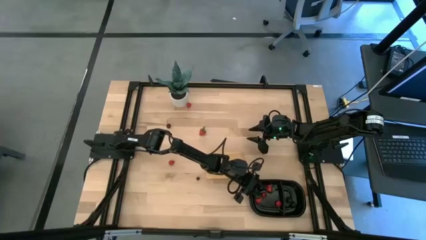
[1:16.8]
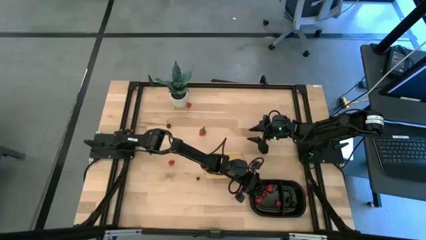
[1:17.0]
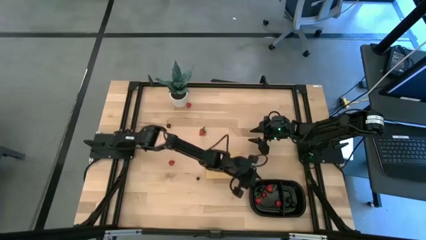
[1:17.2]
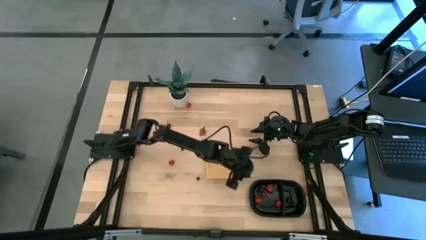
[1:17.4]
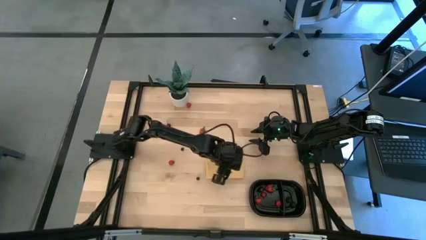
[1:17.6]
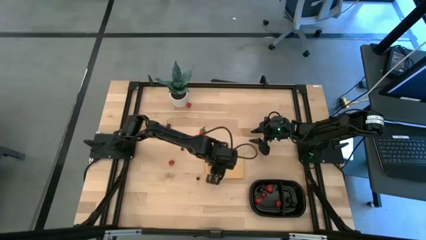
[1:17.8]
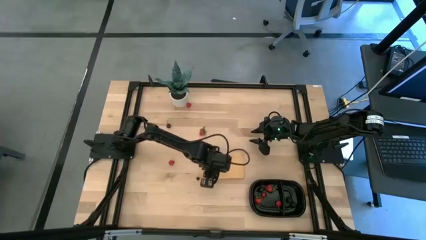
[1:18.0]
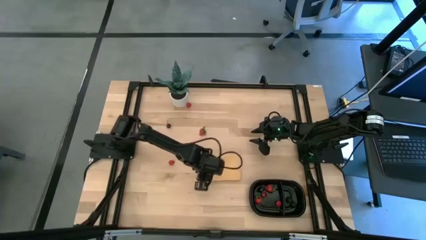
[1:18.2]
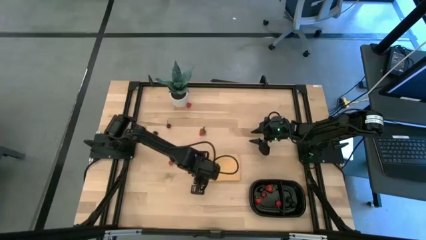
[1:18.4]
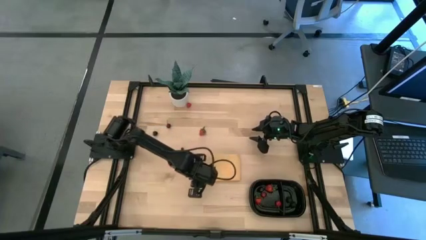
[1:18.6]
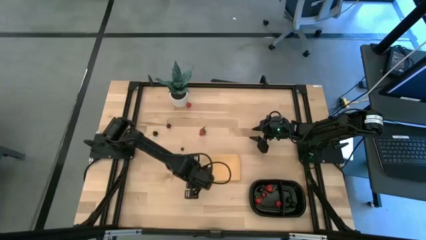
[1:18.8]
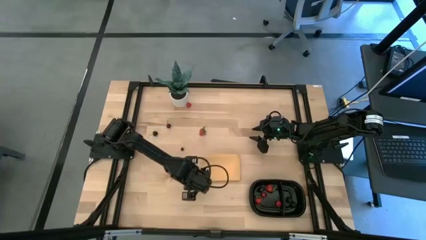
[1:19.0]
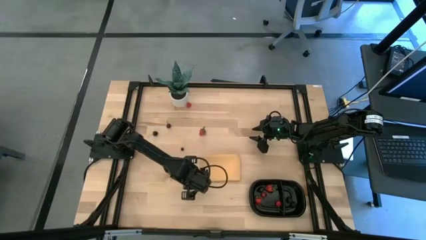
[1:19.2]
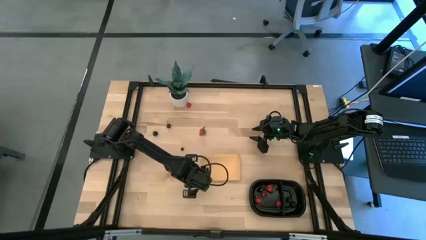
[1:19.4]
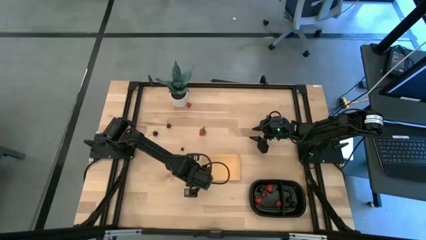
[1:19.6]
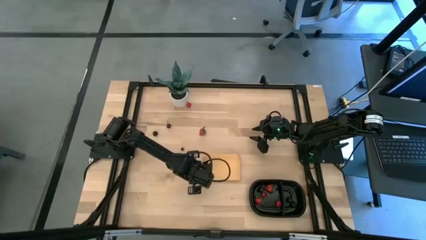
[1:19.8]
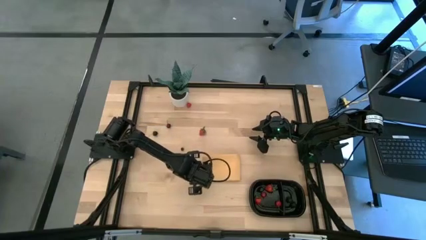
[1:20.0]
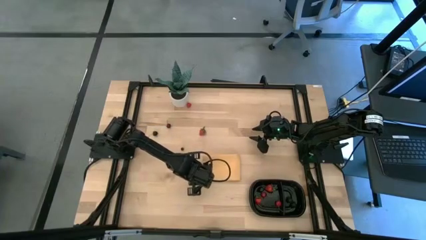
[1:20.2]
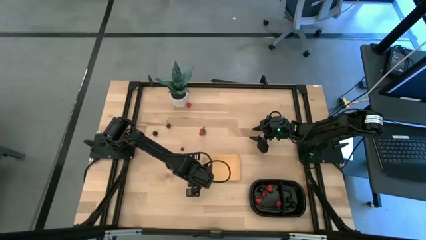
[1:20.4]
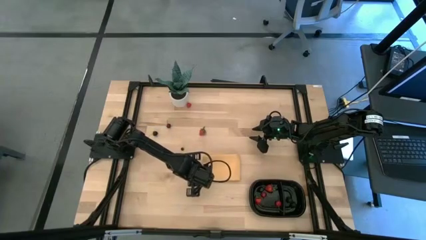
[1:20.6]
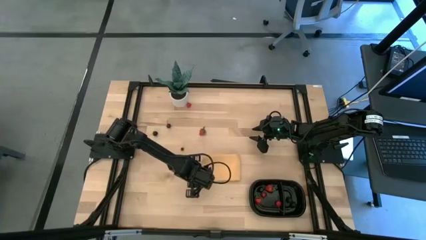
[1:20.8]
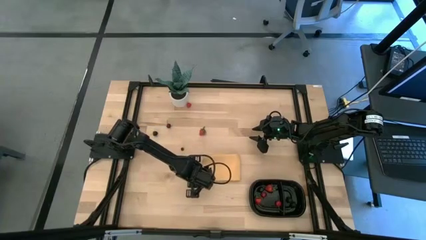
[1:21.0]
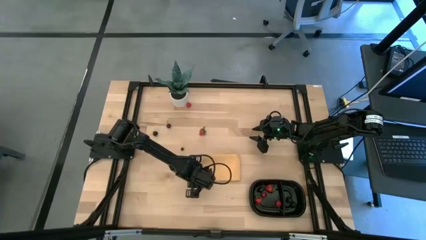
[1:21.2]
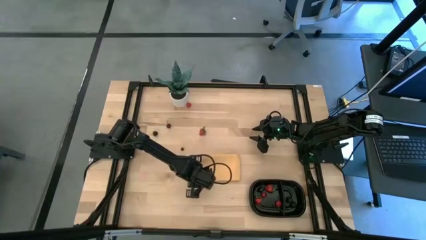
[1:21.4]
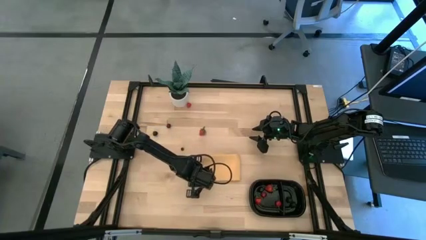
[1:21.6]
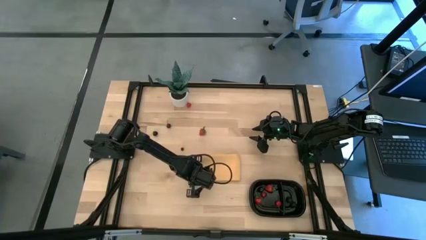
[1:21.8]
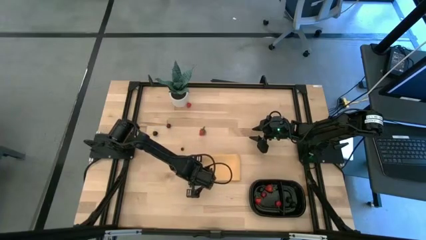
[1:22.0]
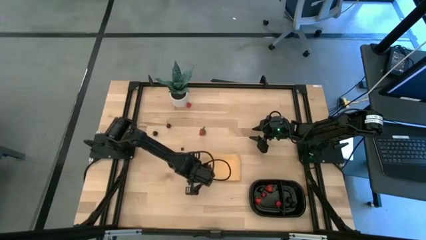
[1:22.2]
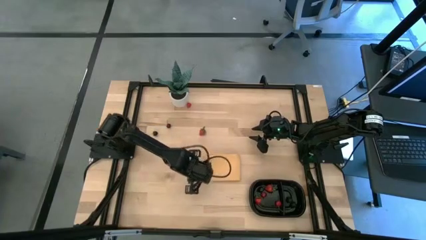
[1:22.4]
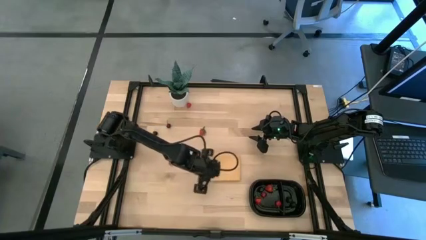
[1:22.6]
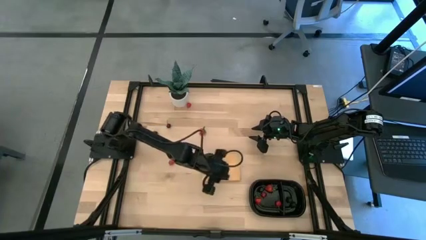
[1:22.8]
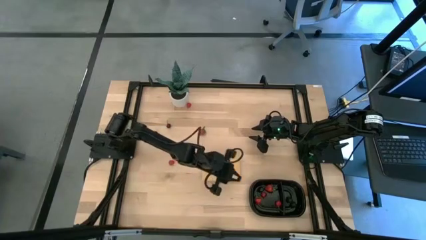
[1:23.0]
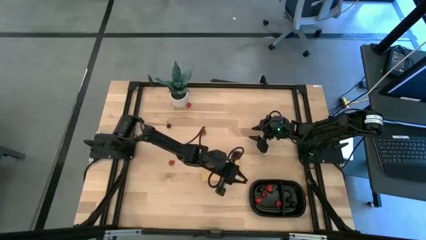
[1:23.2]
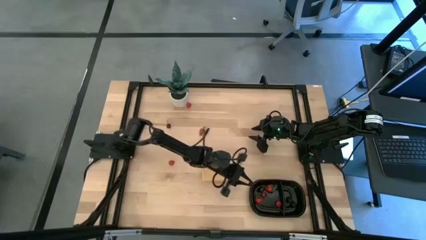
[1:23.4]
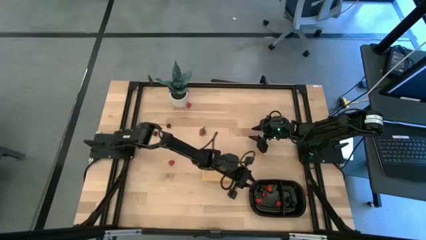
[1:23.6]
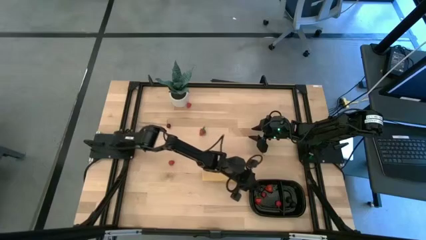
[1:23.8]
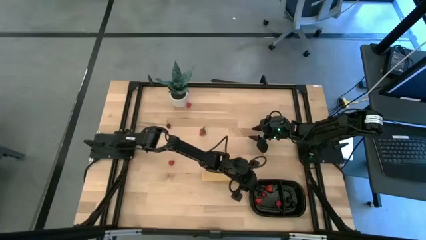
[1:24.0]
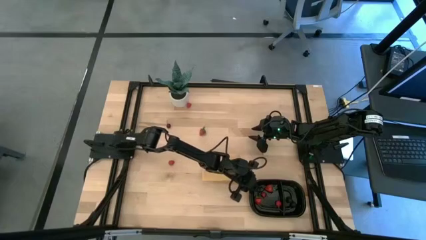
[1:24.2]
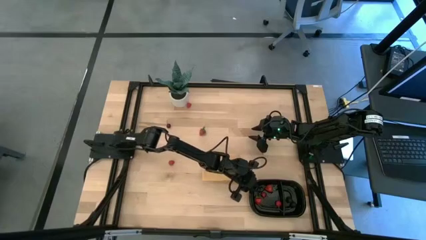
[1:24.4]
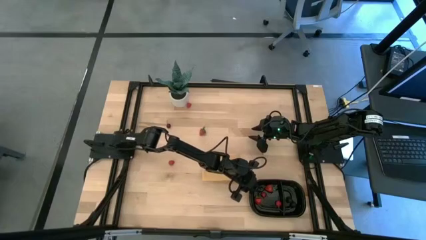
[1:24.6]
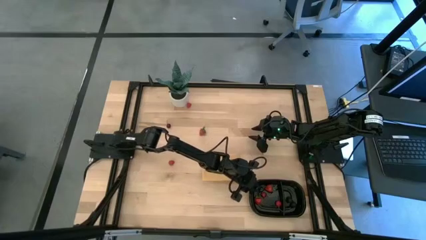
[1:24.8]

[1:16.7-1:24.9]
Task: Pick and placing Produce into tupperware
Put the blueberry into the black container

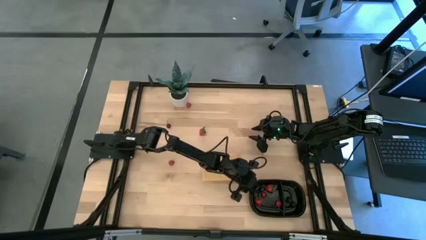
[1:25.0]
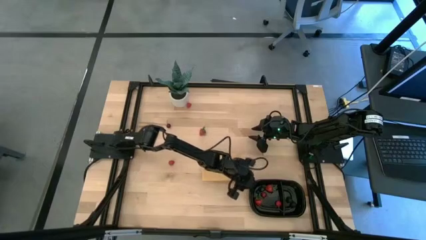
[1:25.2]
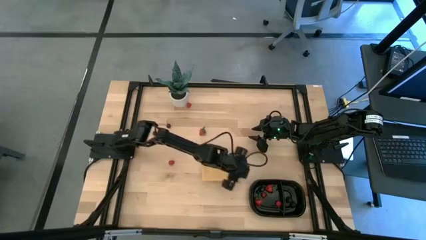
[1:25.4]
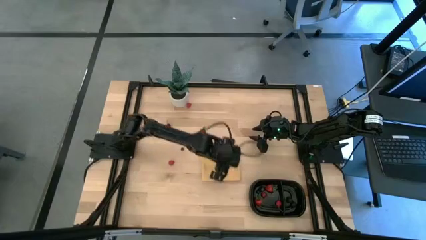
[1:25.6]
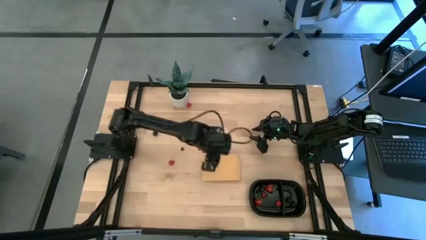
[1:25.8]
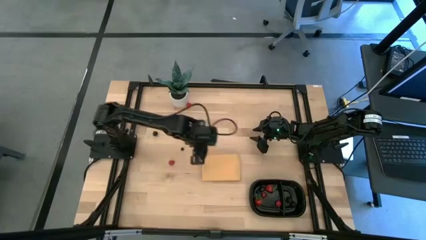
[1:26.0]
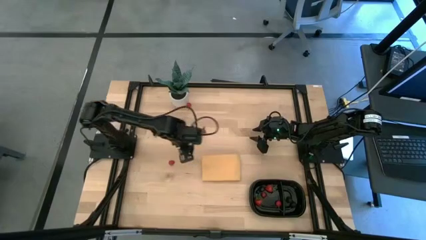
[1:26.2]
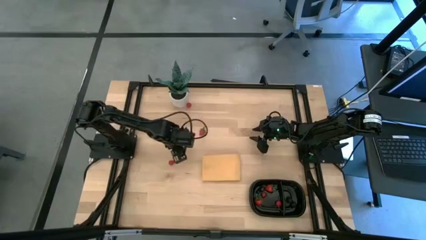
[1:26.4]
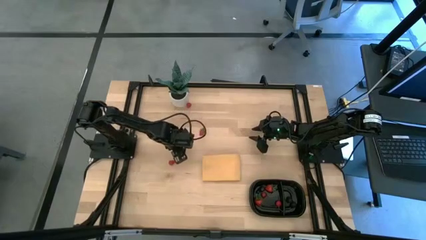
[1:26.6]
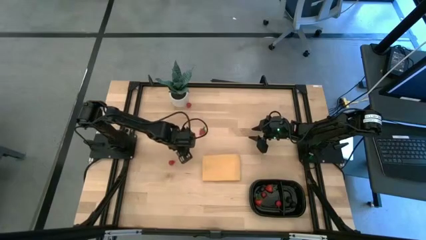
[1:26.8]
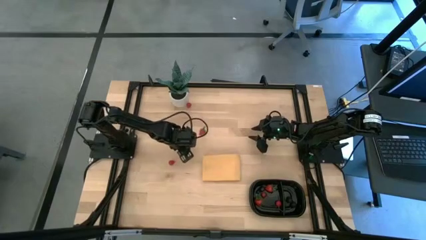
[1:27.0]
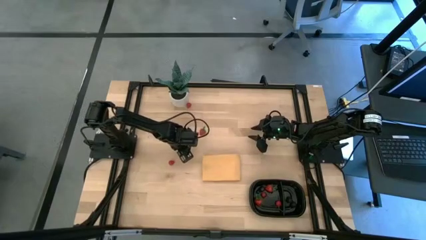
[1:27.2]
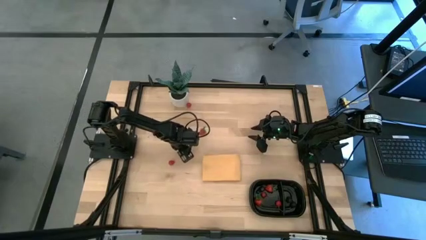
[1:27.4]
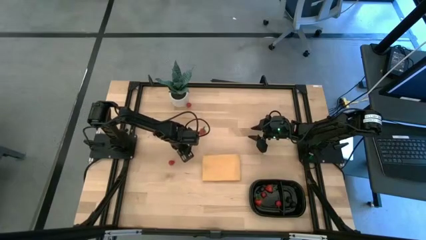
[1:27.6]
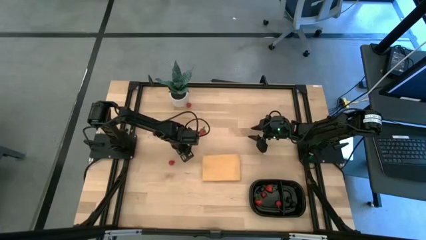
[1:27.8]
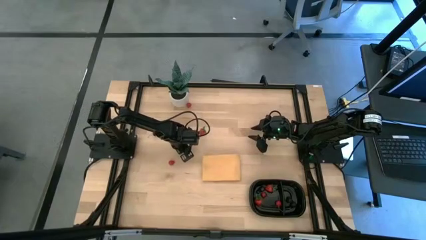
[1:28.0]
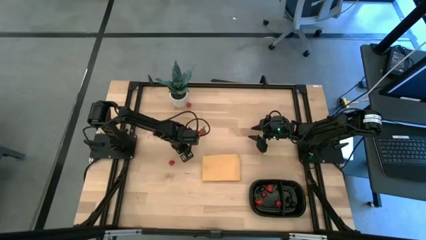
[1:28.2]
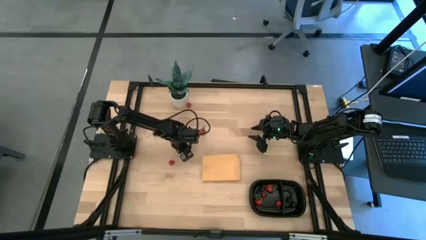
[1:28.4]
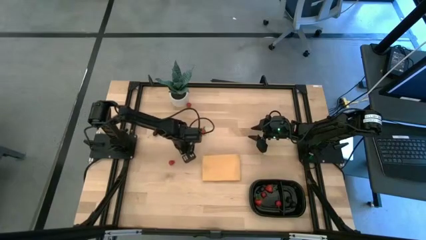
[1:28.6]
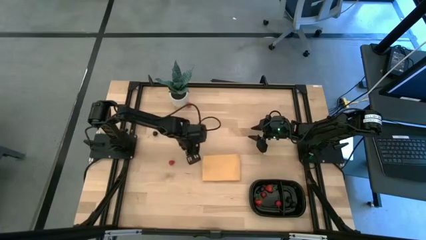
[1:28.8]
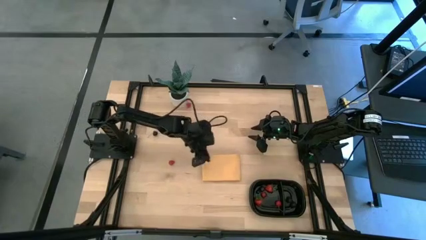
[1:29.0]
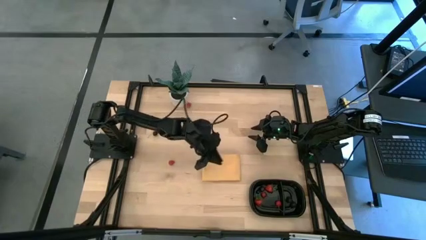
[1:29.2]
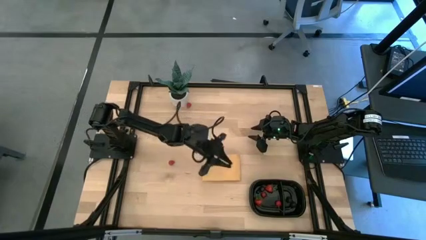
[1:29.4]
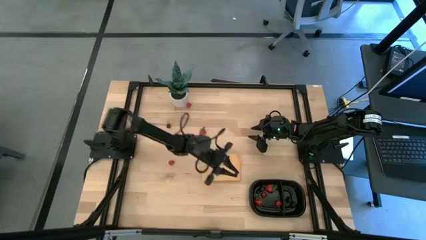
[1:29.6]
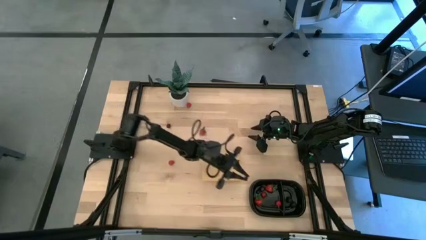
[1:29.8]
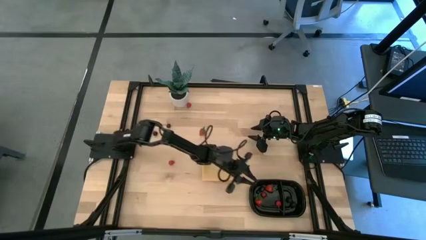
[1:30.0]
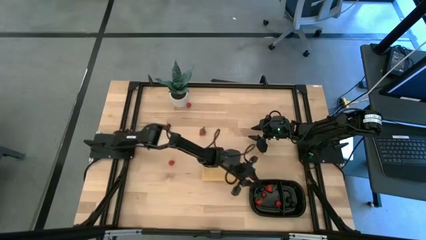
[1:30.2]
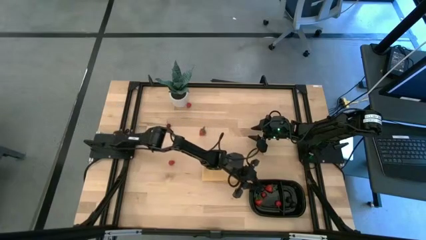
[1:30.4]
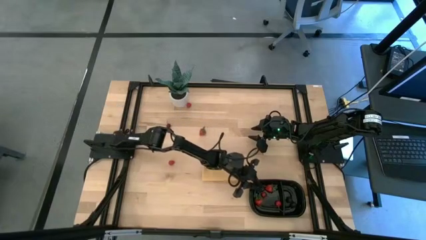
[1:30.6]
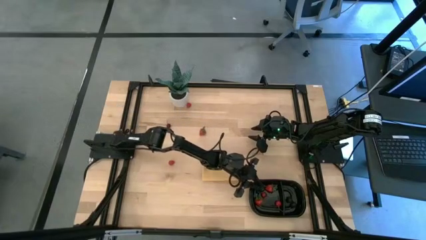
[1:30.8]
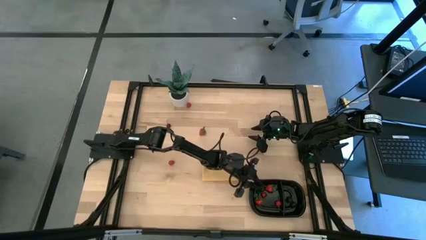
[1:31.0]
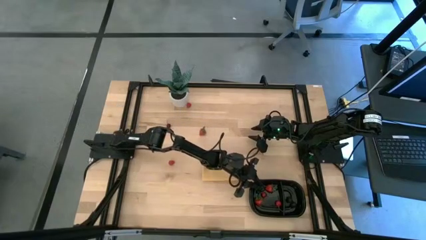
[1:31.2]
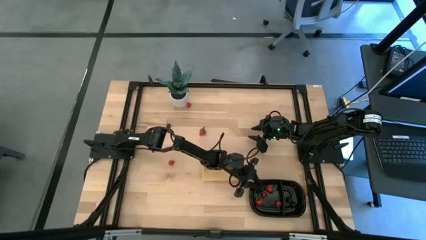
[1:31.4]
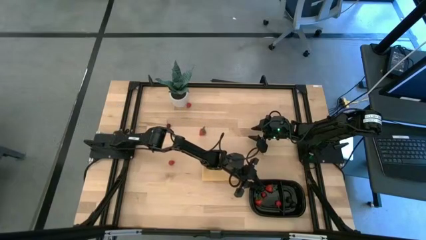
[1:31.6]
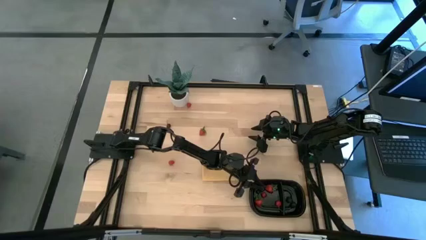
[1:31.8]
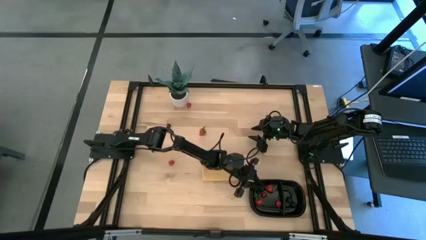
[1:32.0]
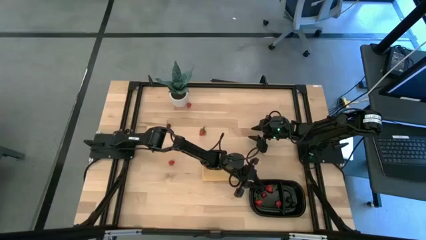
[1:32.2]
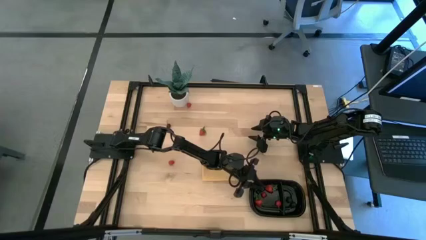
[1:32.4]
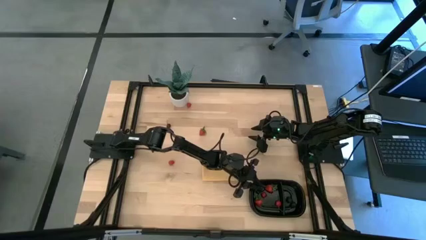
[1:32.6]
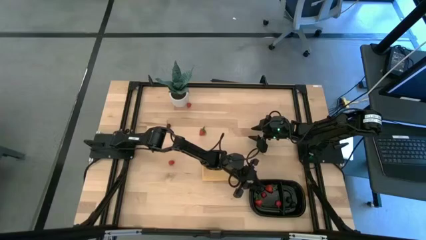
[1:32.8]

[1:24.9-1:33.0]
Put the blueberry into the black container
